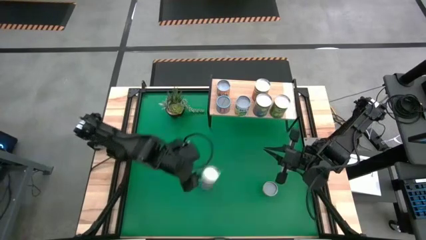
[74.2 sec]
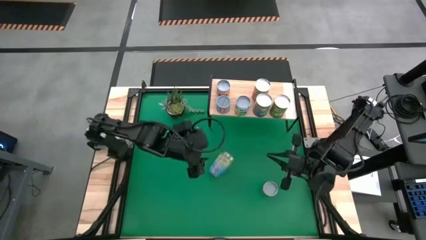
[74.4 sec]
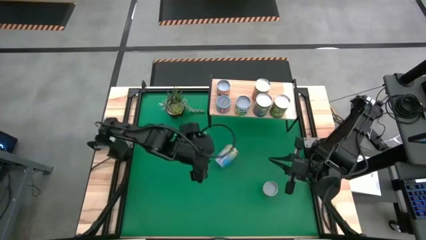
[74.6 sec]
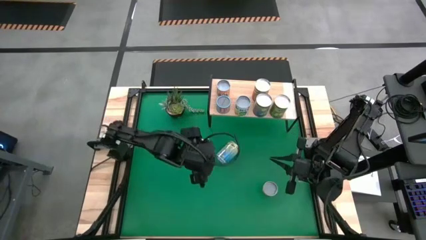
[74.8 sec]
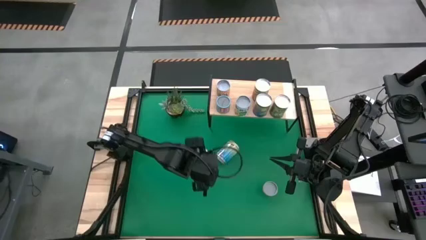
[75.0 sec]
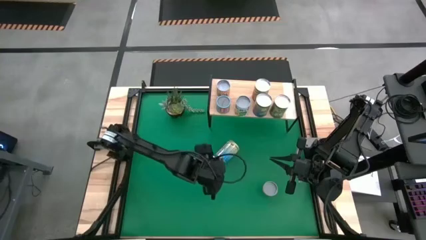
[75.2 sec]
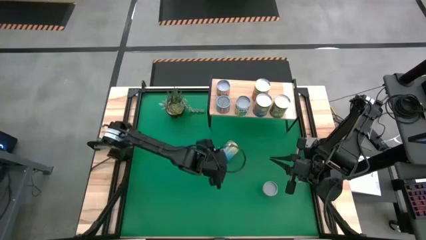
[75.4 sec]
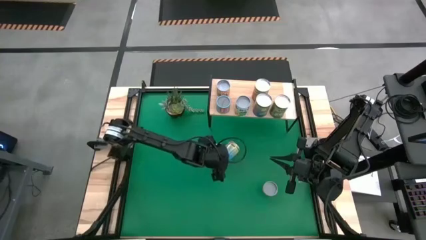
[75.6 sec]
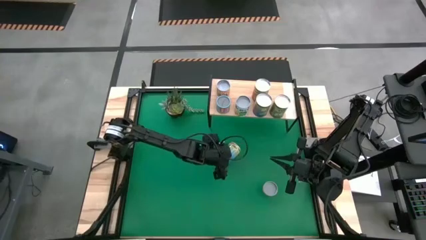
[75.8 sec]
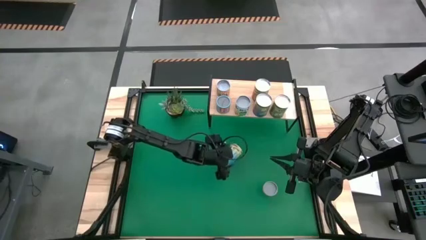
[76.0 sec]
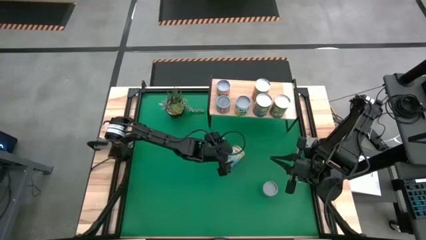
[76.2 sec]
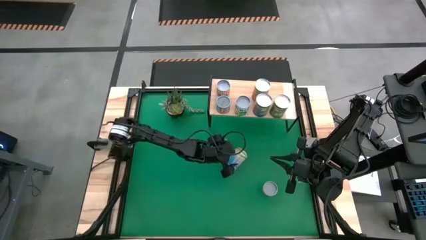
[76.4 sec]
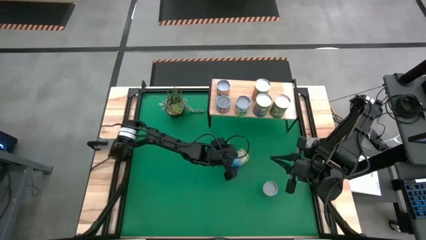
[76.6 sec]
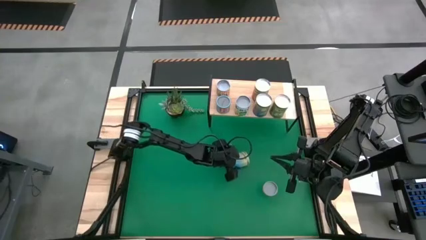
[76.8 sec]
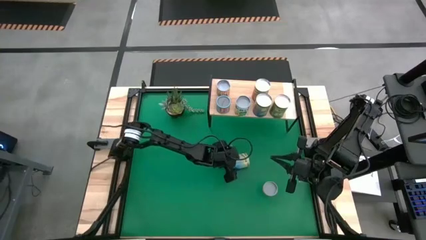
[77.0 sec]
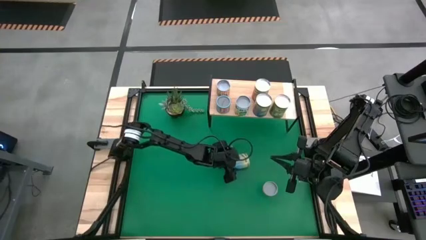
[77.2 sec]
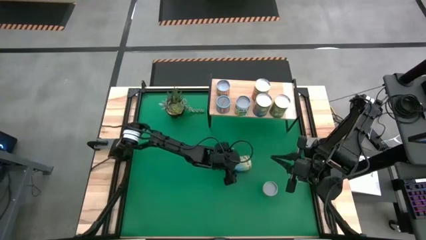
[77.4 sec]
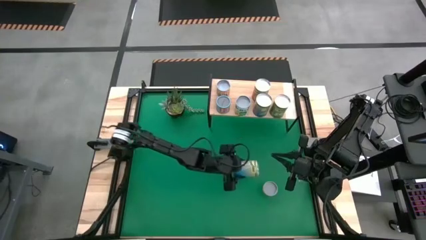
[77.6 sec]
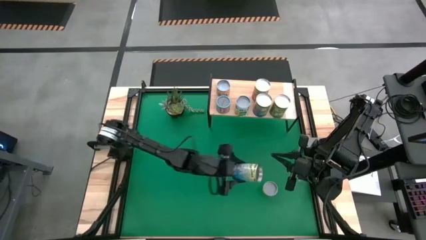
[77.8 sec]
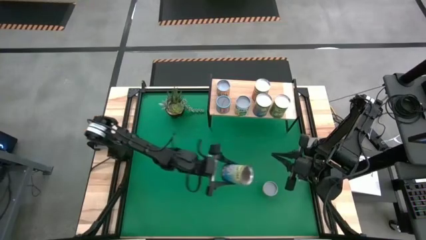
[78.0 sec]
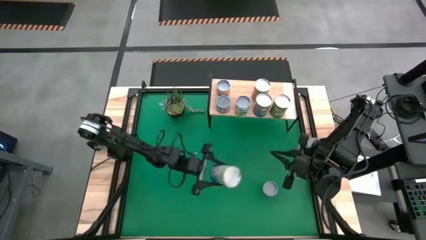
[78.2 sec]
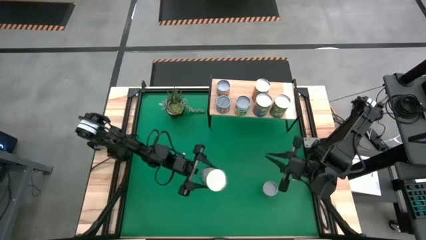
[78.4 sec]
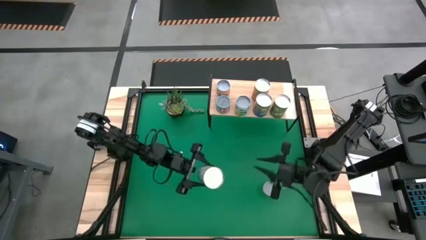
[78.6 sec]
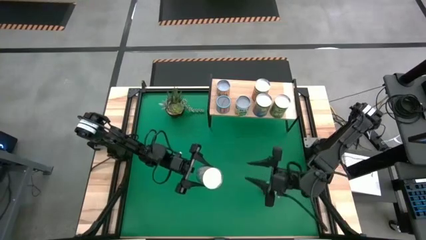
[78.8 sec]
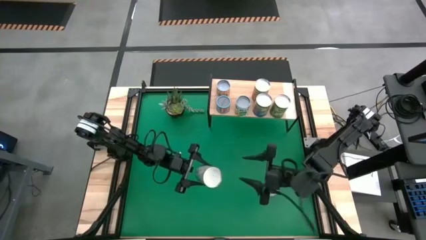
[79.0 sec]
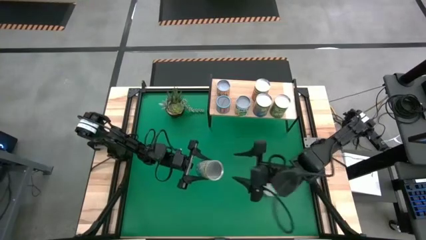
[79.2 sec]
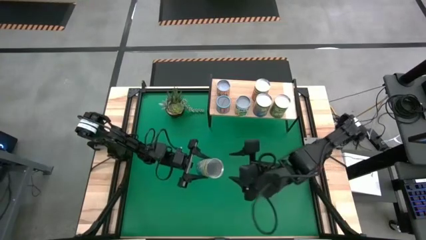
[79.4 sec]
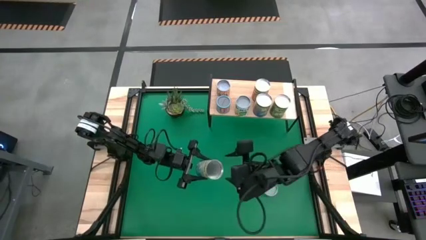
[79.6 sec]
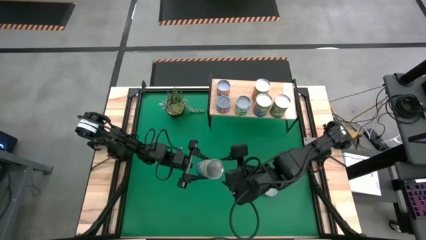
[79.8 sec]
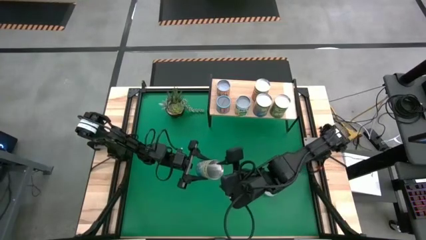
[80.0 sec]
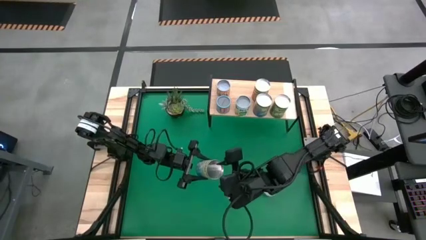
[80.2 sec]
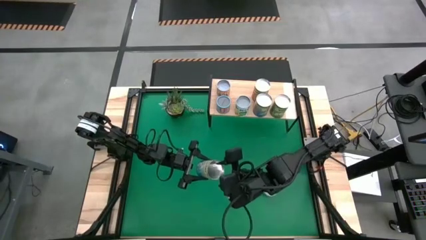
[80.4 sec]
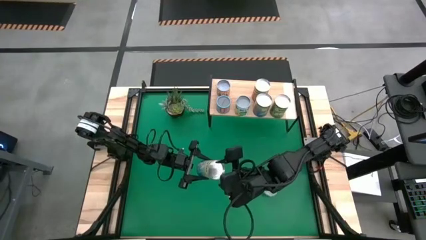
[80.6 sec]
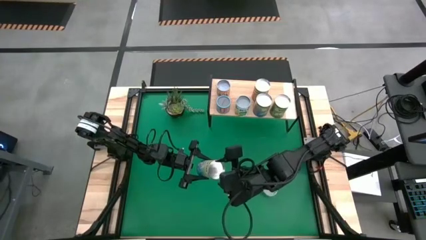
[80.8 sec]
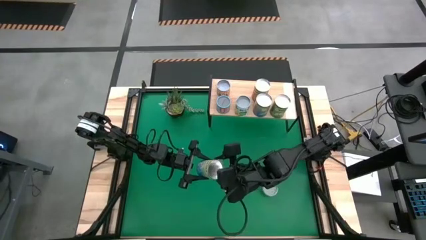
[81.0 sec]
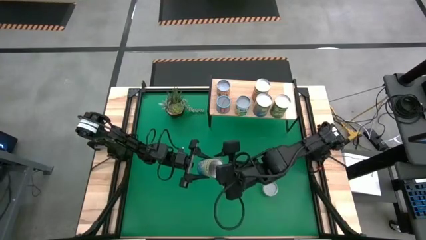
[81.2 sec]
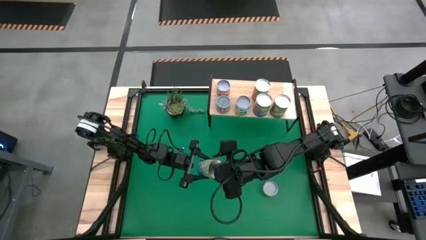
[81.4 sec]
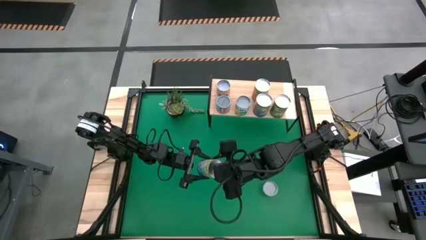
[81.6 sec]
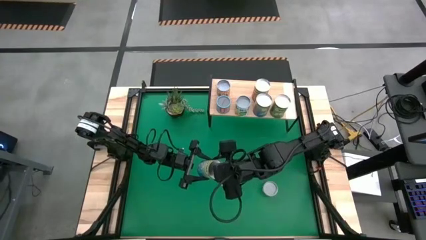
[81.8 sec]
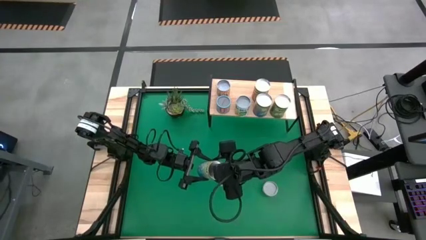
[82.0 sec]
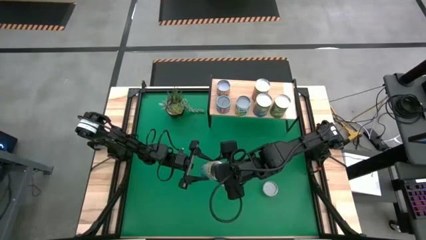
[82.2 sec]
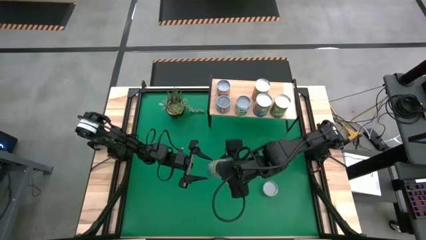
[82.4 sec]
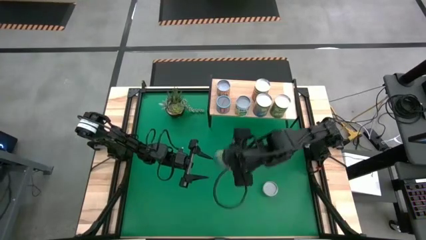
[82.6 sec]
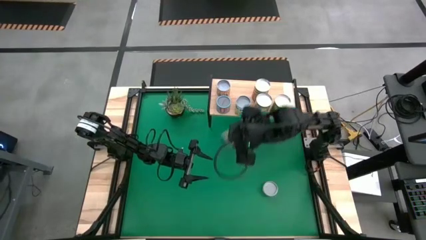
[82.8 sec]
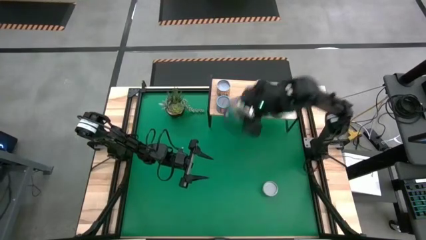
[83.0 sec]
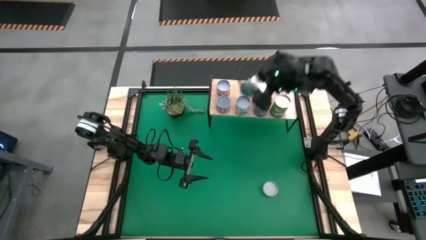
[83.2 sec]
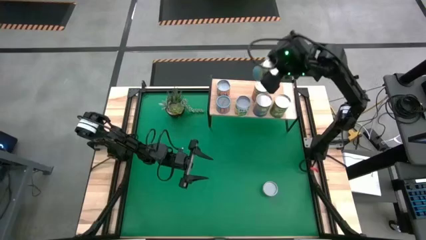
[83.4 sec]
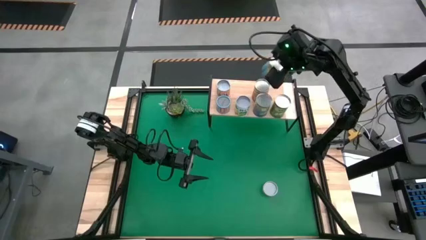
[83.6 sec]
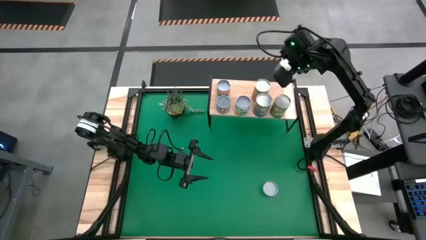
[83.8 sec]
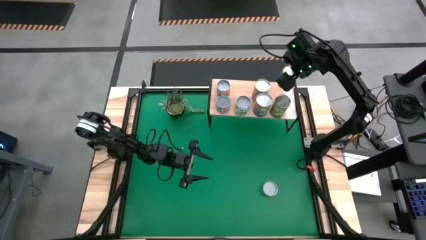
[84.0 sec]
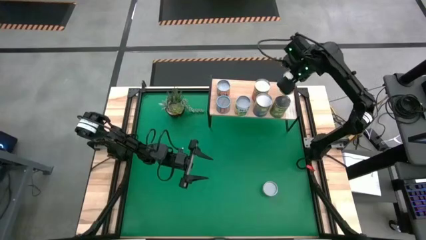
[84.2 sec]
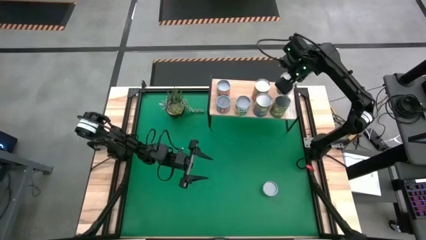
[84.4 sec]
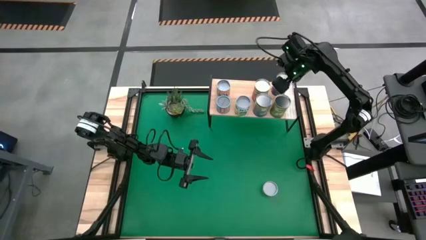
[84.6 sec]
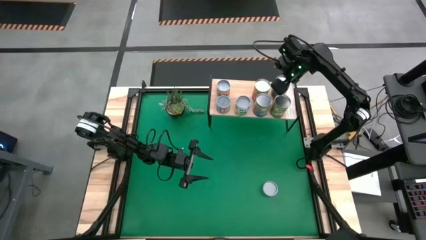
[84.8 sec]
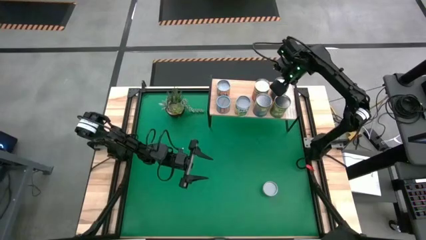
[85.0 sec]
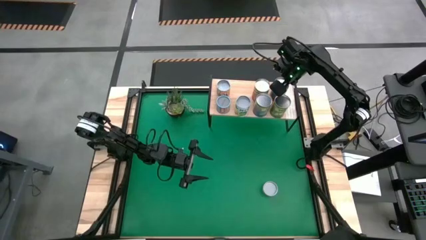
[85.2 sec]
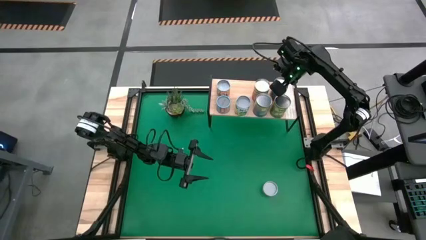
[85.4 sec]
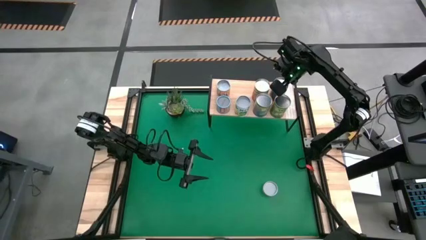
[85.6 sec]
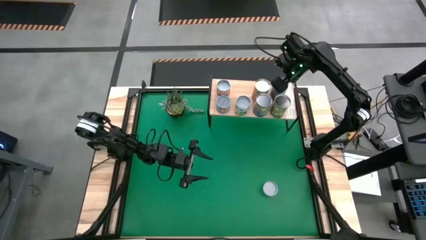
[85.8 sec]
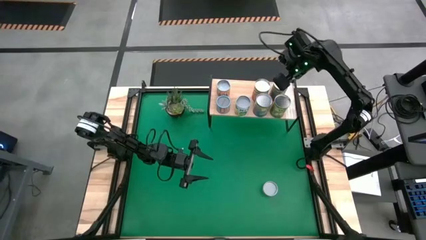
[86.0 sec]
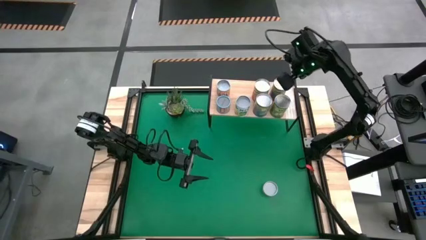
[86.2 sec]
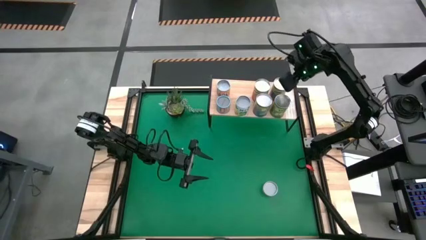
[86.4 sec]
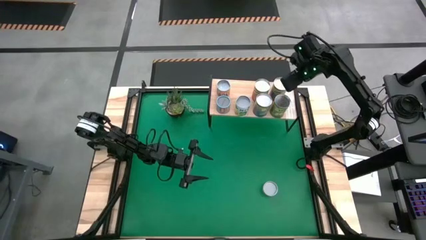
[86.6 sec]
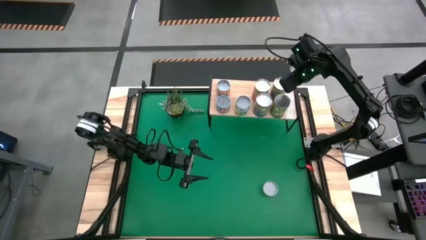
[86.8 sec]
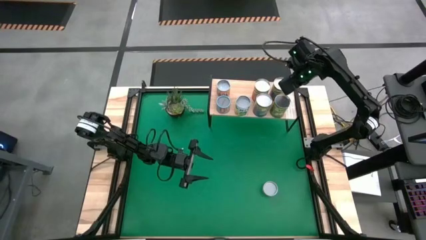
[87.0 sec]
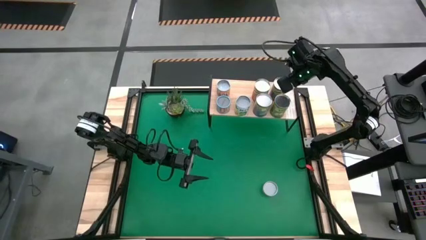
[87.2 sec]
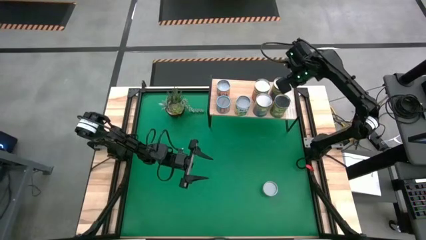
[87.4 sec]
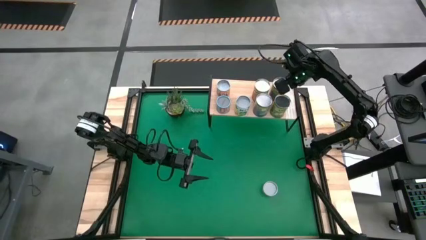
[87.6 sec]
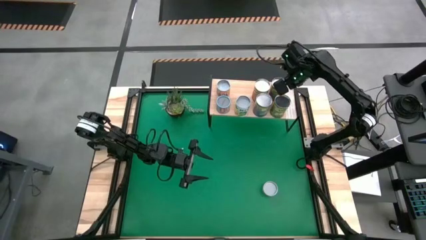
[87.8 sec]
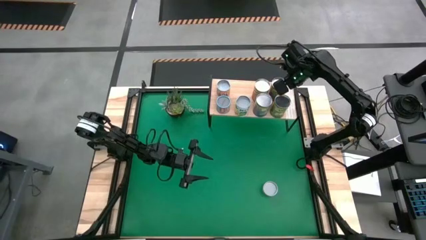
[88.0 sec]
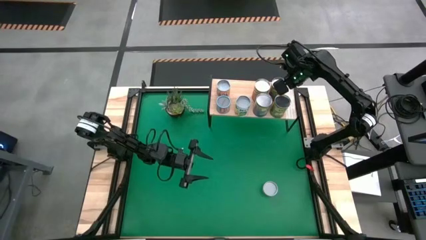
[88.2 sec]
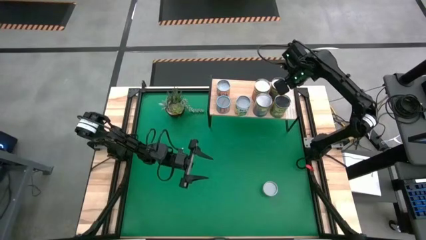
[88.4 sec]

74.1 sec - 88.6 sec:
Task: Pick and place cans onto a shelf
Put the canned cherries on the shelf
